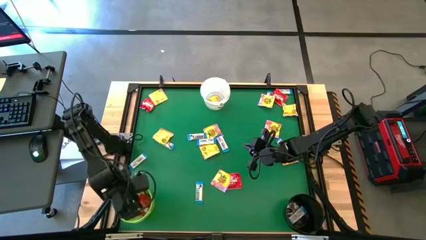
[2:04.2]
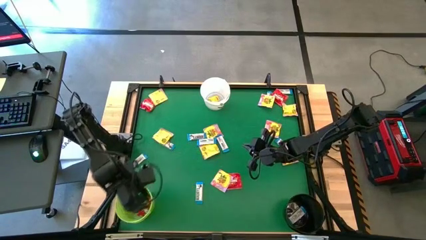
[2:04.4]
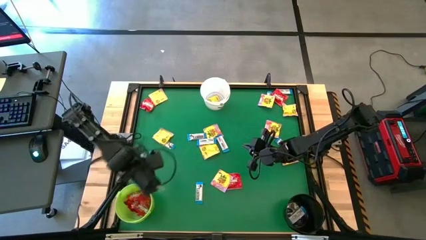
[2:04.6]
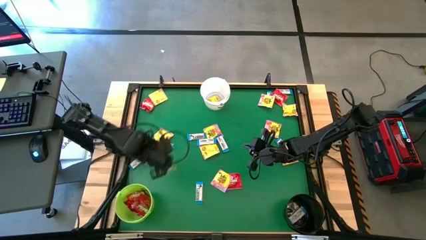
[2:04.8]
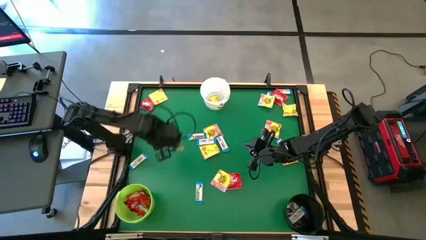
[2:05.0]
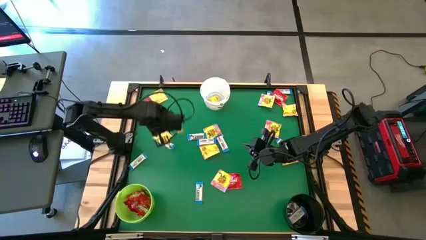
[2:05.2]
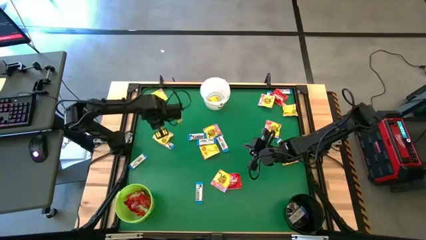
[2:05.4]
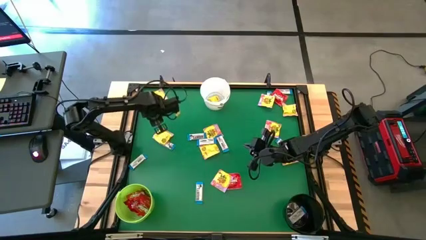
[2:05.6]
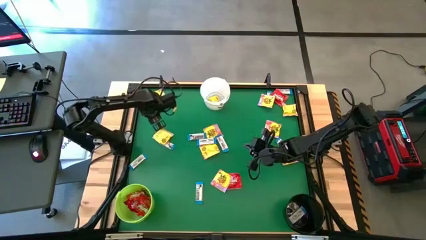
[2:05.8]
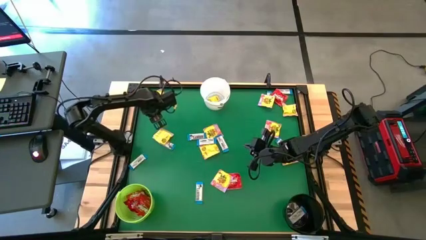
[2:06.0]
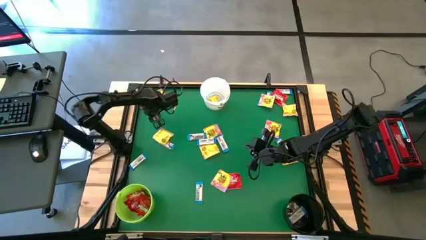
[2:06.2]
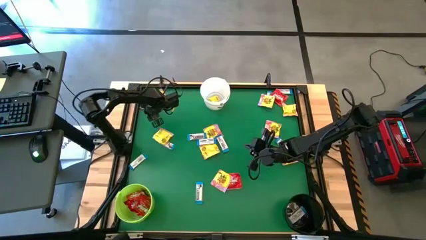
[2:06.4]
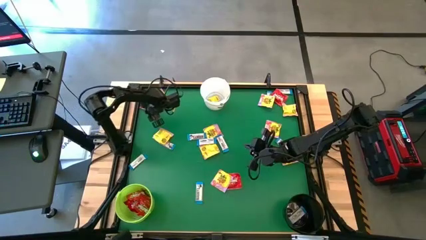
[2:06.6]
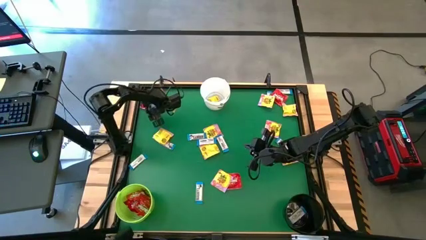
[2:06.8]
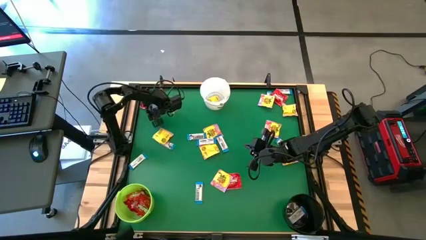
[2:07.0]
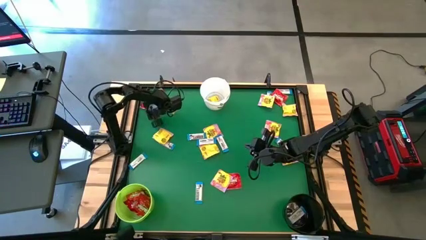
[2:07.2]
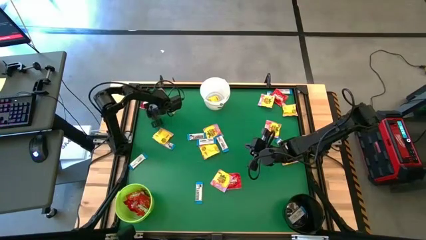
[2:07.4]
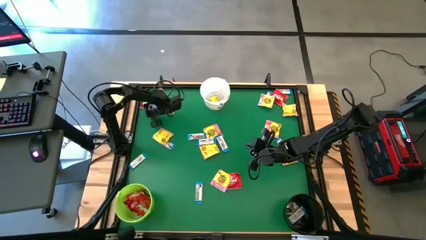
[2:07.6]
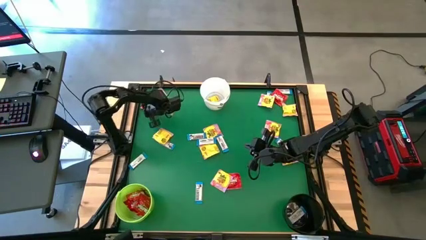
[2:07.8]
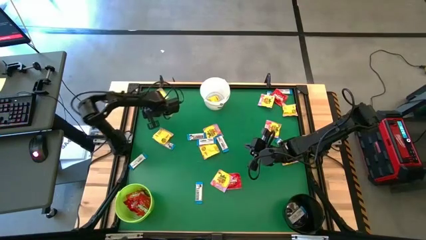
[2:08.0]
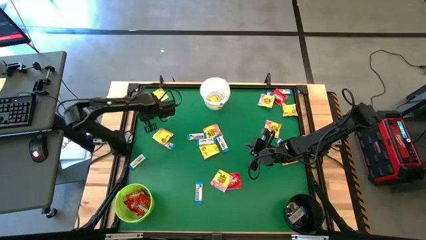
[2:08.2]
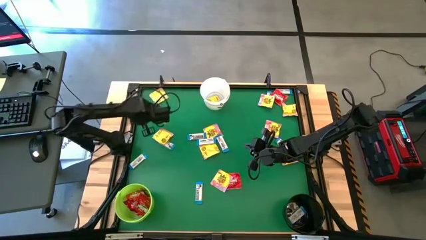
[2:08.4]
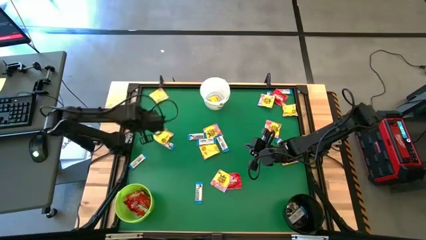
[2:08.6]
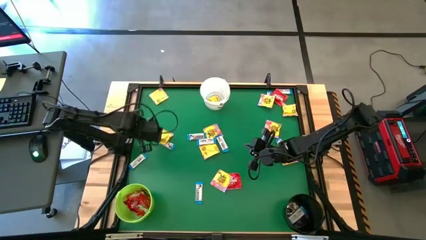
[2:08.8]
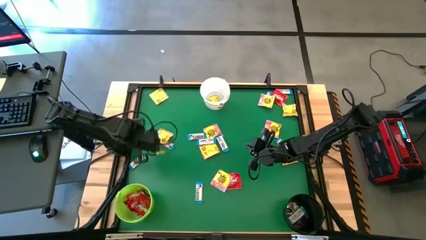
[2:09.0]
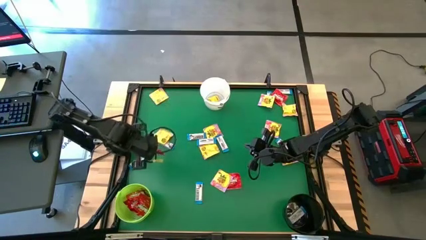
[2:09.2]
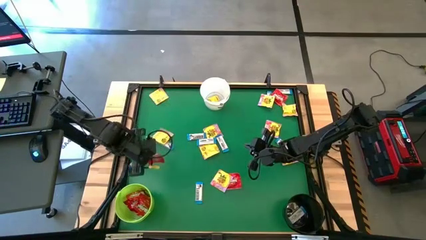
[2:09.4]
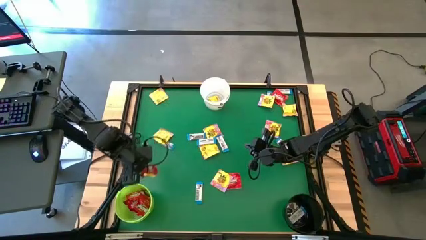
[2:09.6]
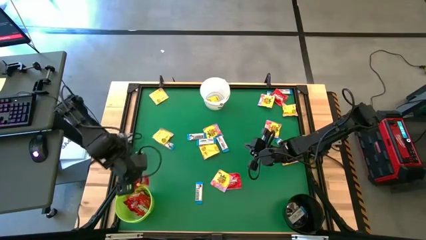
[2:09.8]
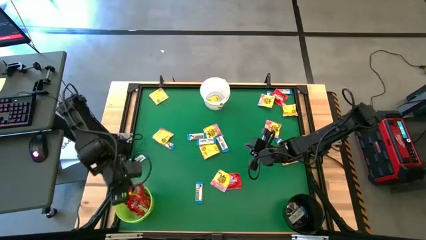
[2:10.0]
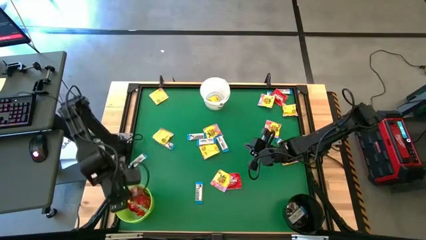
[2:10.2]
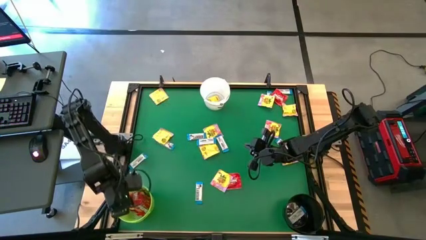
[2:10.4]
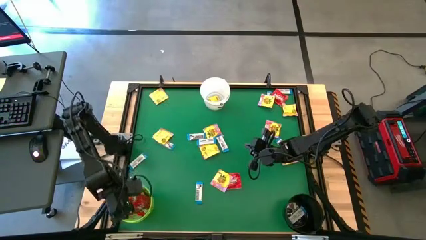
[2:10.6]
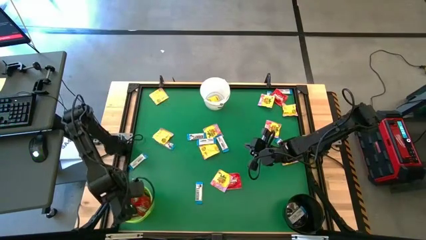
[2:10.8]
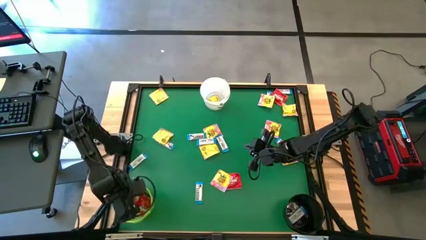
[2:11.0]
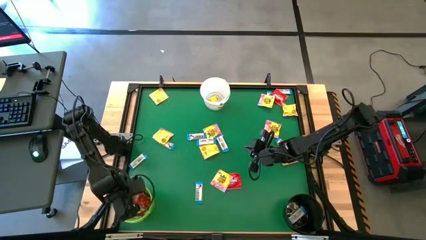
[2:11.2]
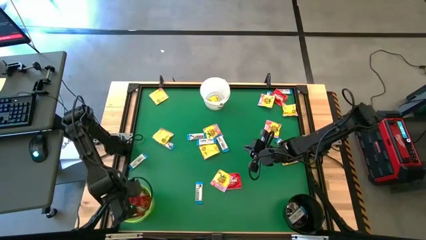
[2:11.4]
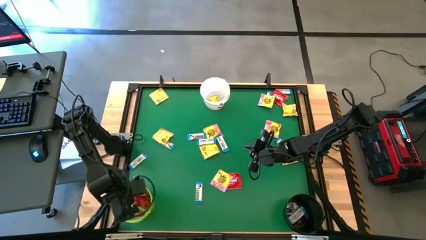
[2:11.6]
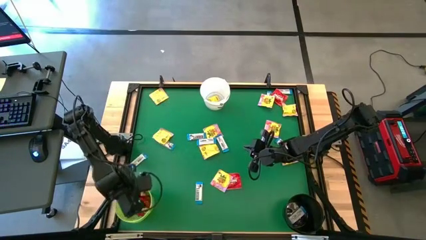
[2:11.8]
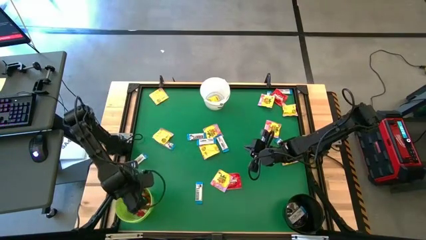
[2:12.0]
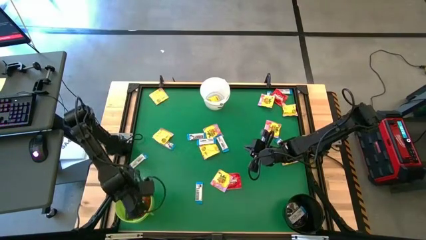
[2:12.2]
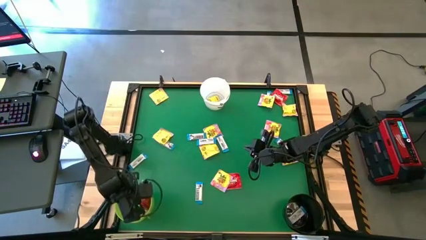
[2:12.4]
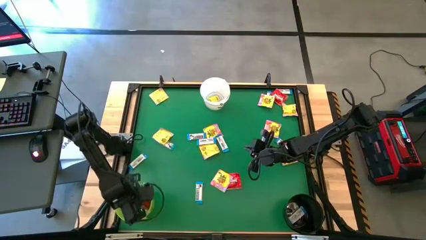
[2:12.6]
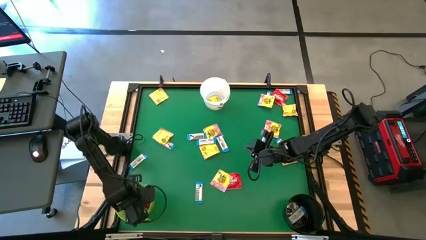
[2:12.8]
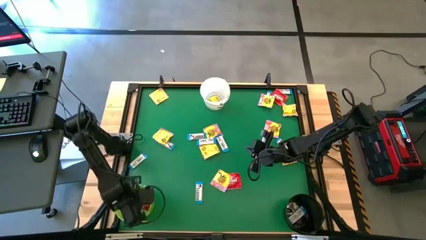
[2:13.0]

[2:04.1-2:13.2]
Task: Sort candy by brand, put in halloween buckets
Put the red candy into the green bucket

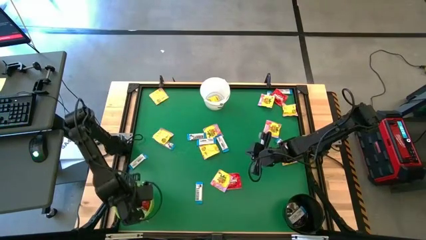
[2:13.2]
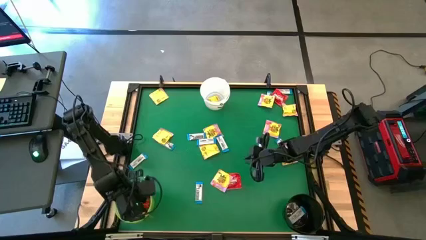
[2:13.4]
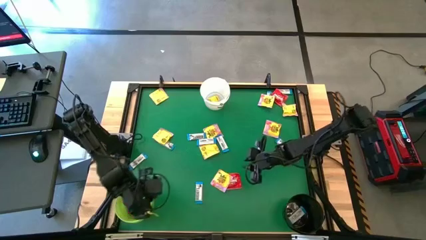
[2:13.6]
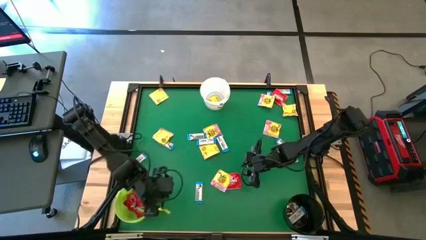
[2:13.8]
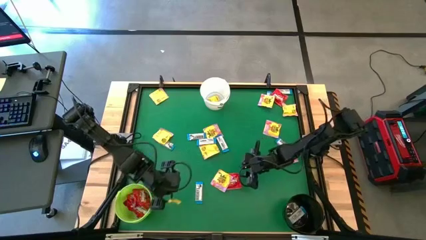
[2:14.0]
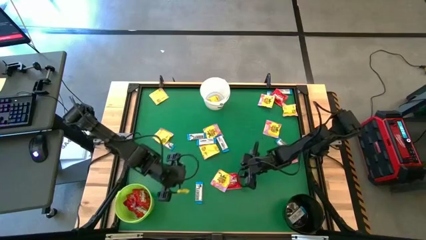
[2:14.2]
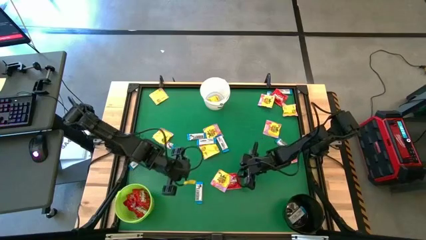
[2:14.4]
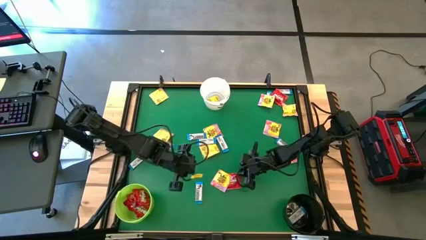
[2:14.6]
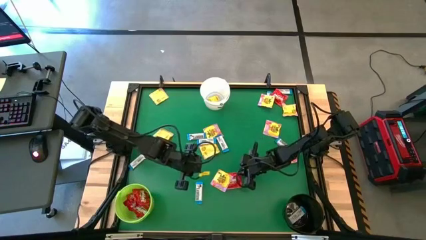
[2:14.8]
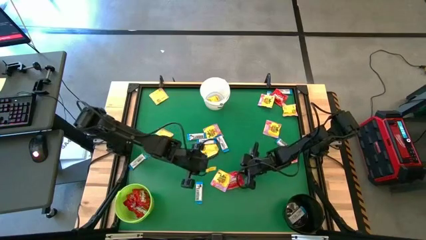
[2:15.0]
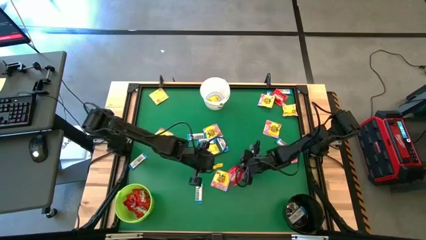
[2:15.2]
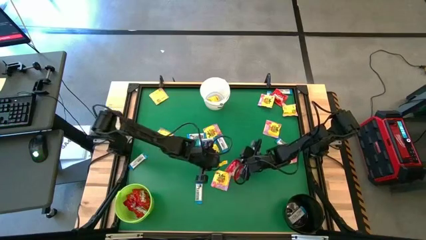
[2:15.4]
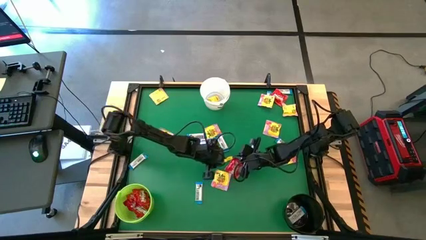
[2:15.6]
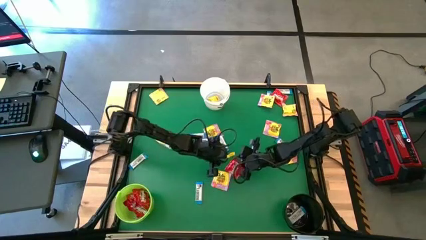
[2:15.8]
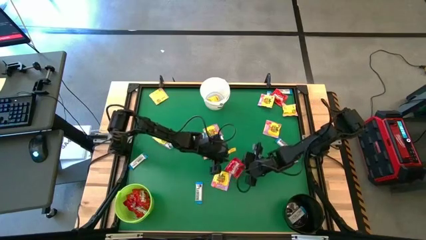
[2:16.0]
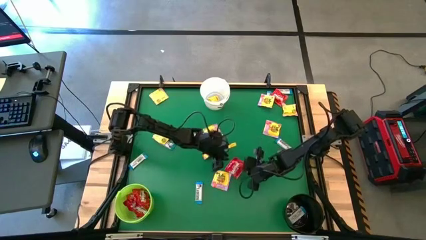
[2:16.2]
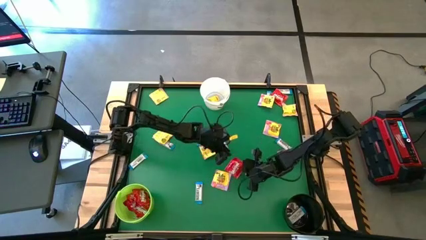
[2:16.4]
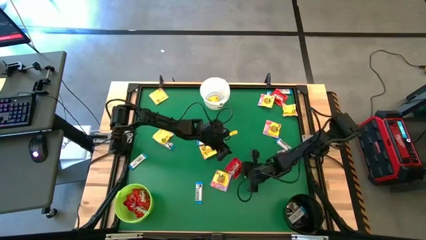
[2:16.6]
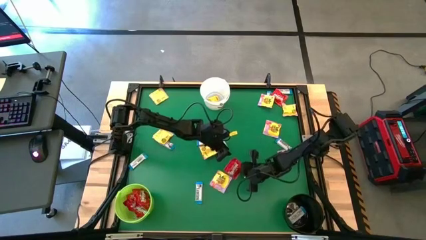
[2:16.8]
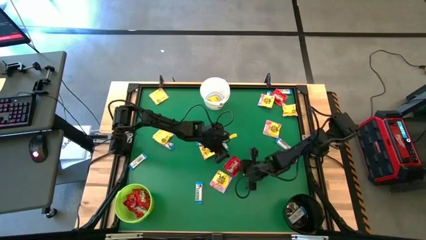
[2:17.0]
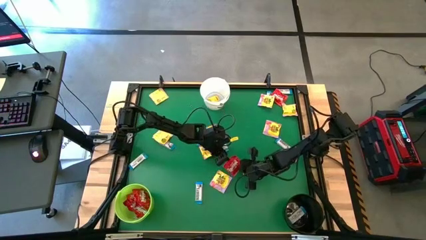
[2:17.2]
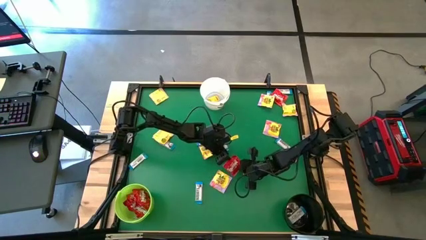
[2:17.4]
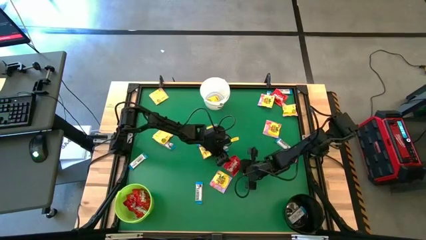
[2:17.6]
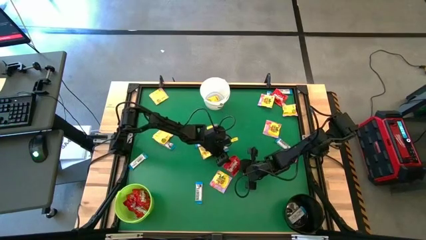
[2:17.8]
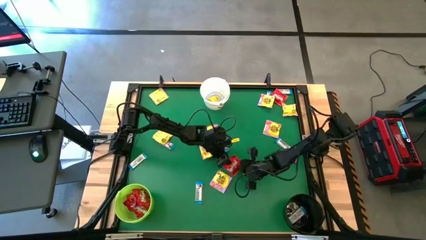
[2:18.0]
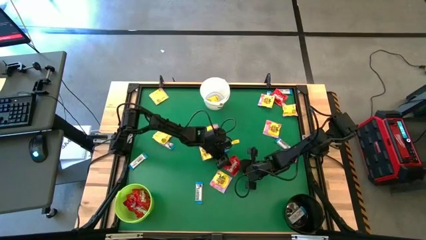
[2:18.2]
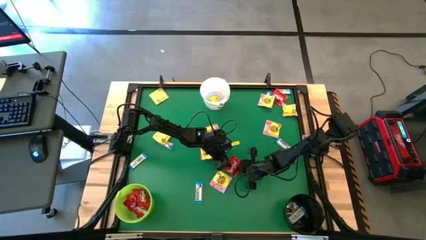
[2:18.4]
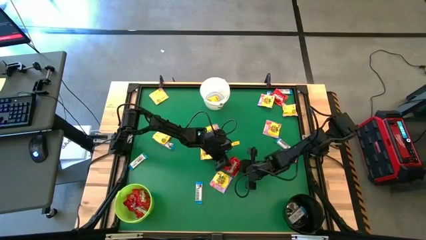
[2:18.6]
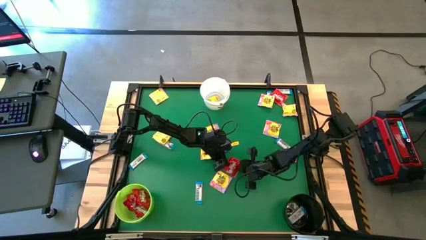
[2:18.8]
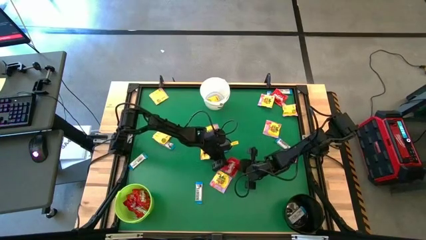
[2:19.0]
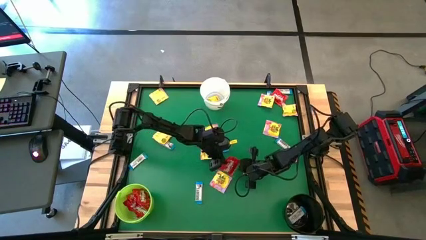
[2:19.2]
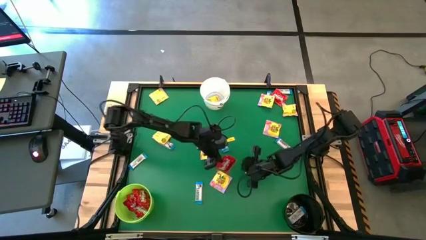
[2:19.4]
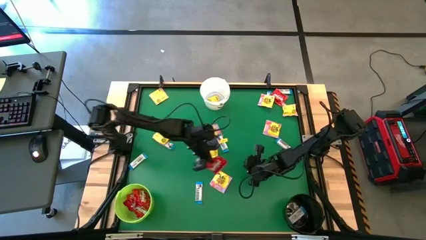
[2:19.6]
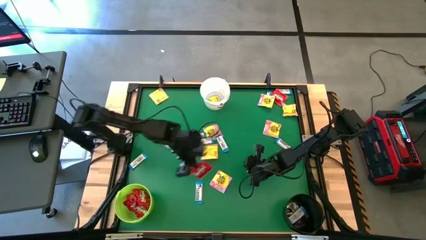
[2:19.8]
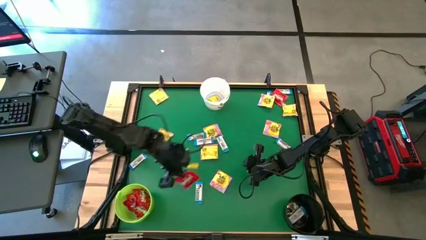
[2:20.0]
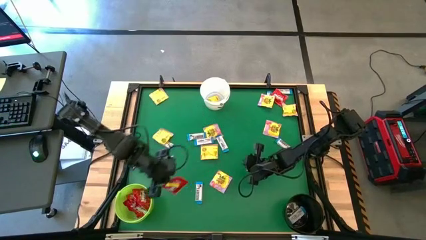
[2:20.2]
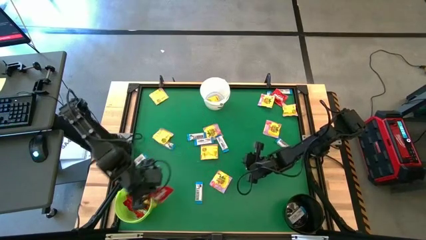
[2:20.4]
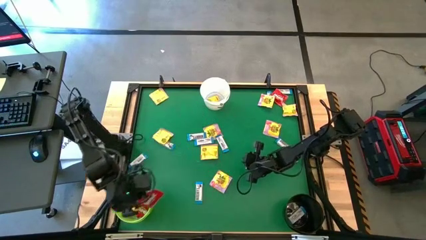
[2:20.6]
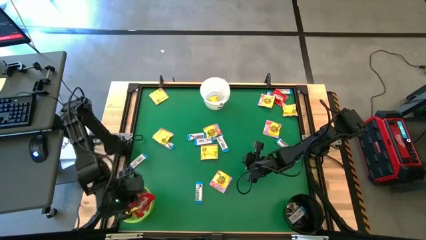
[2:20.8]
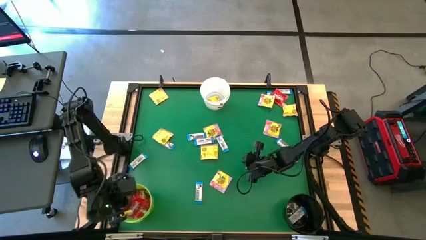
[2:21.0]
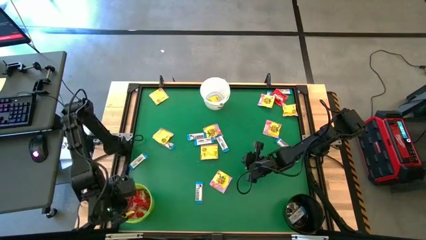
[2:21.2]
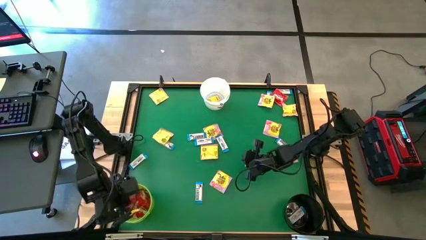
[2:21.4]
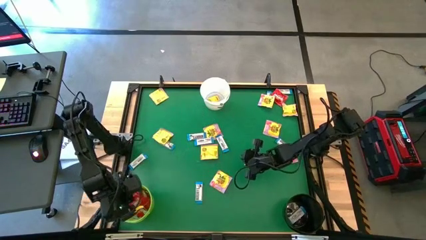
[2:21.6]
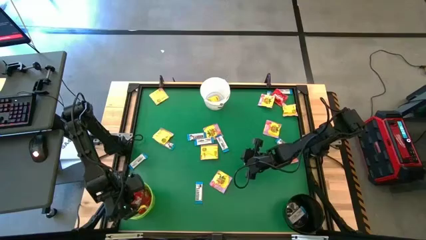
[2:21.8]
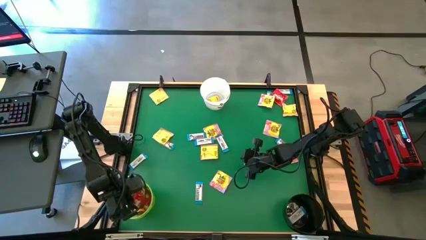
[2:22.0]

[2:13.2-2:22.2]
Put the red candy into the green bucket
